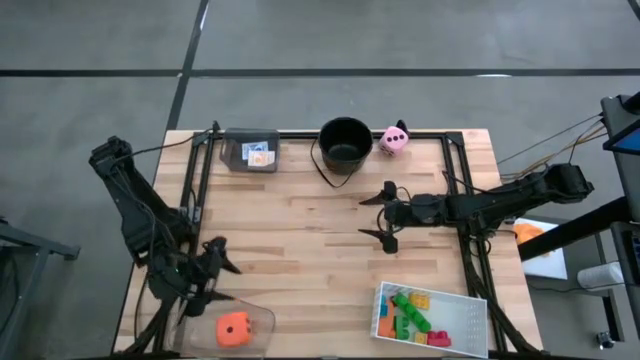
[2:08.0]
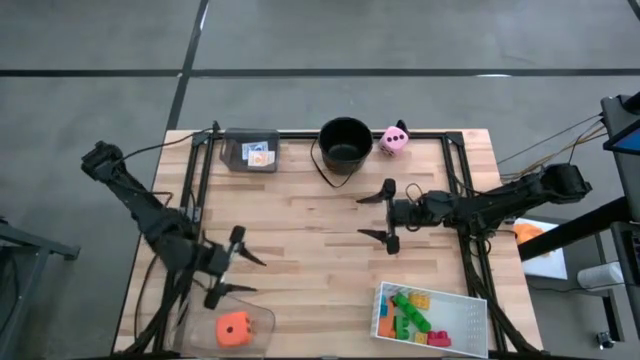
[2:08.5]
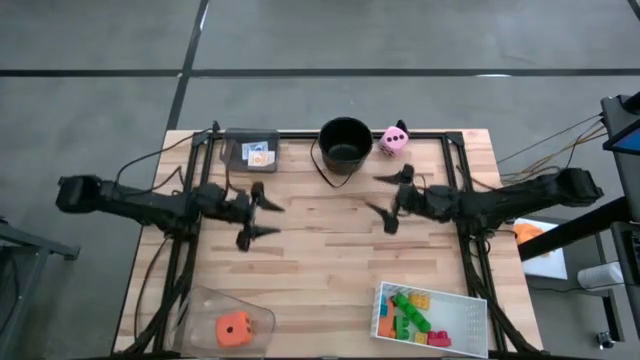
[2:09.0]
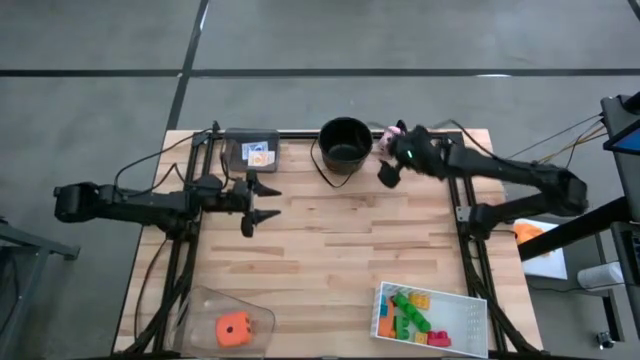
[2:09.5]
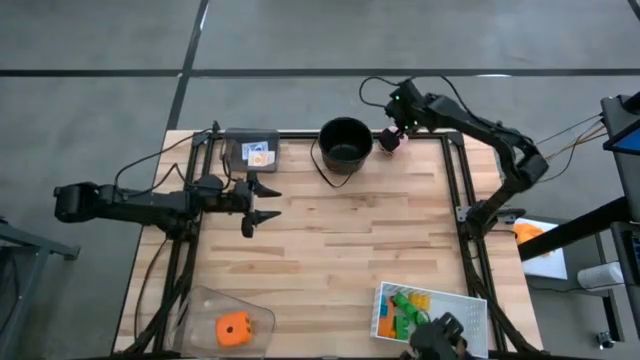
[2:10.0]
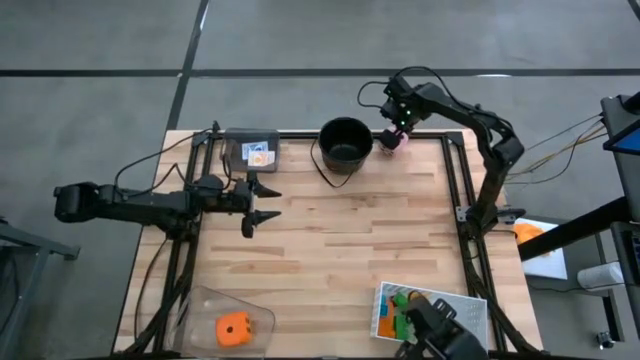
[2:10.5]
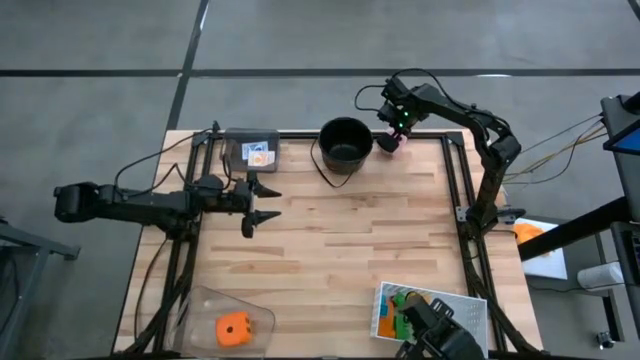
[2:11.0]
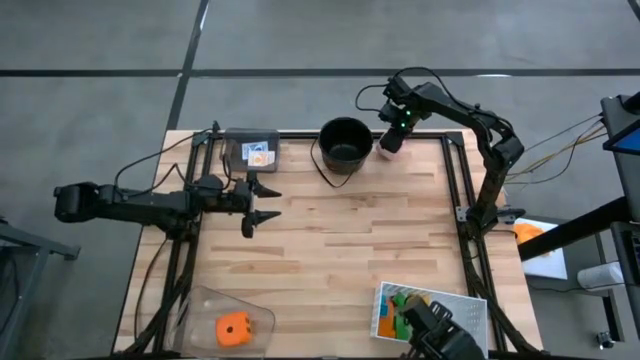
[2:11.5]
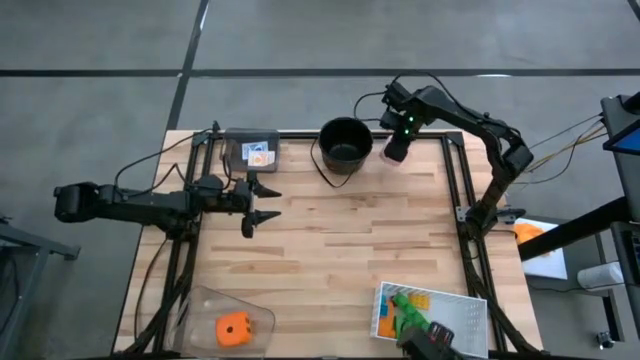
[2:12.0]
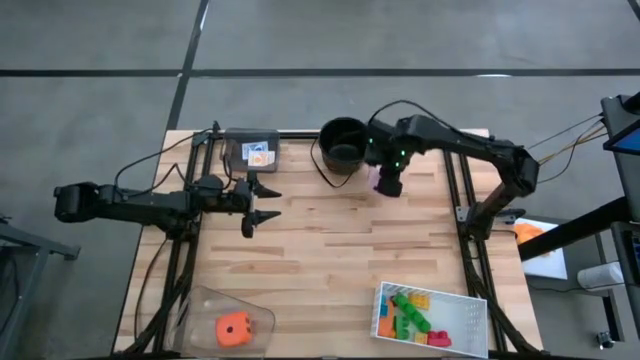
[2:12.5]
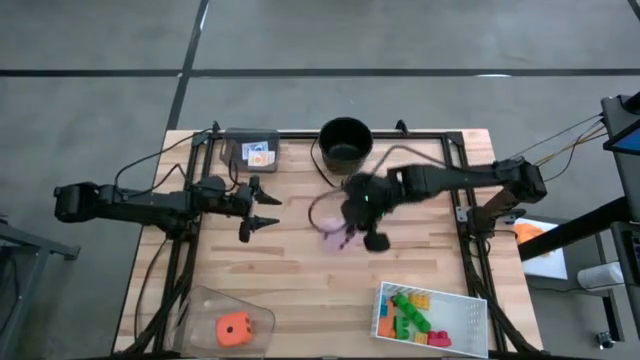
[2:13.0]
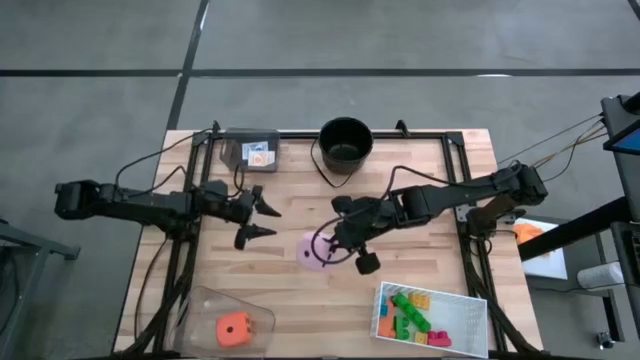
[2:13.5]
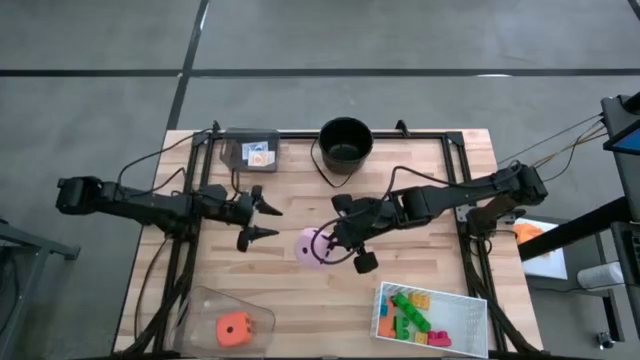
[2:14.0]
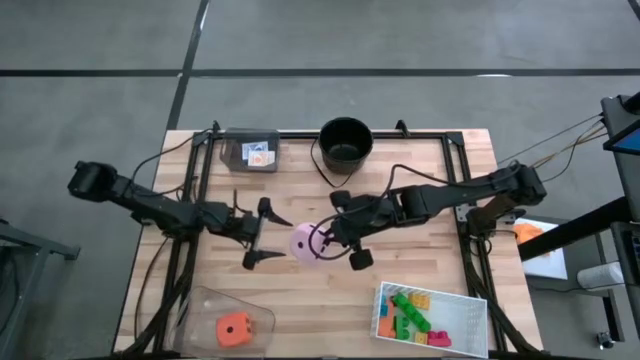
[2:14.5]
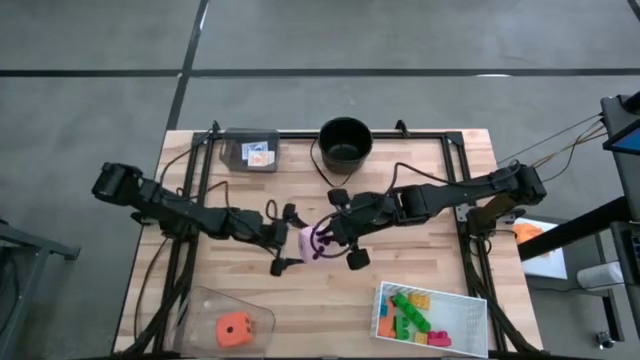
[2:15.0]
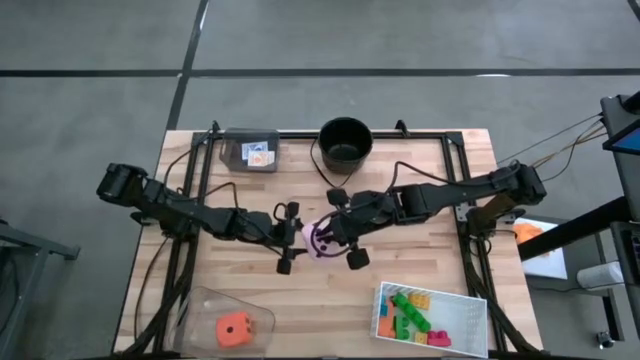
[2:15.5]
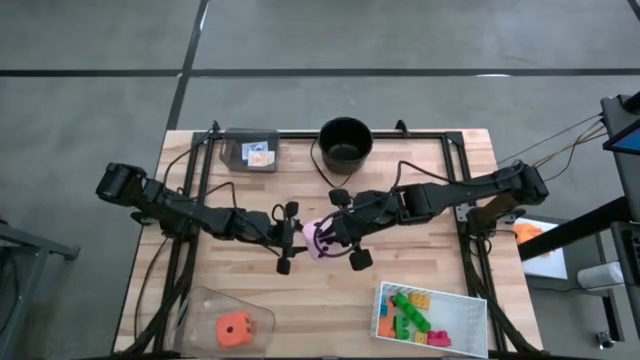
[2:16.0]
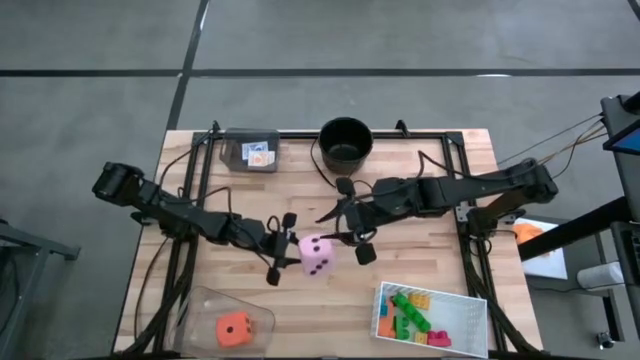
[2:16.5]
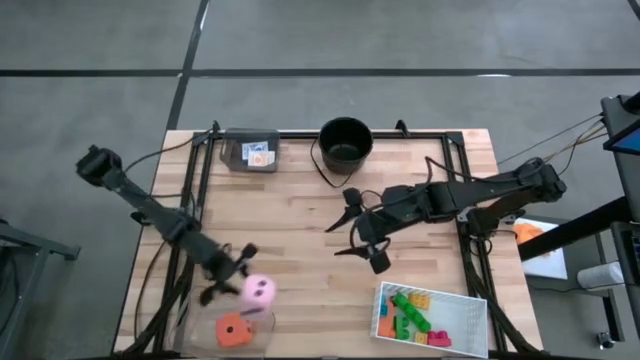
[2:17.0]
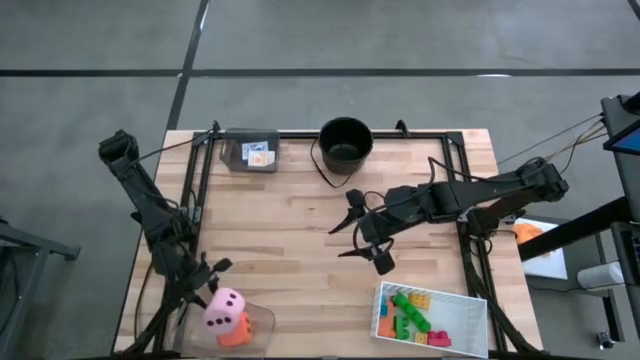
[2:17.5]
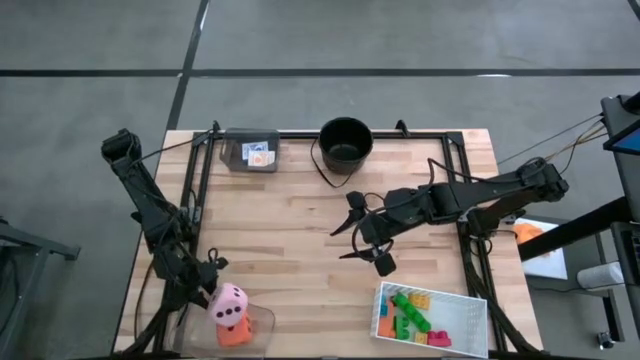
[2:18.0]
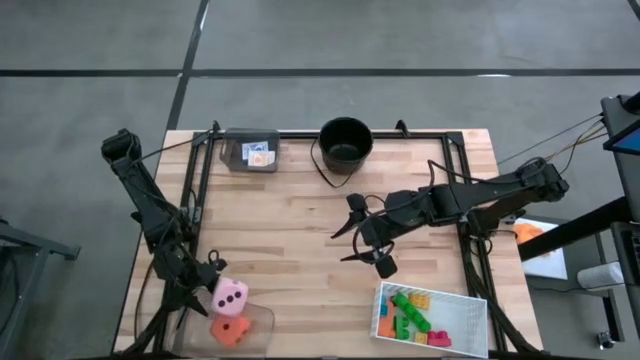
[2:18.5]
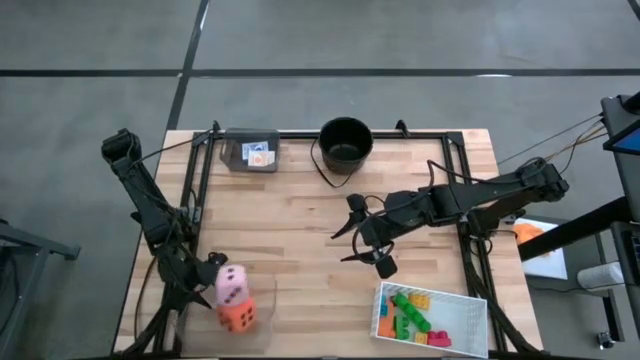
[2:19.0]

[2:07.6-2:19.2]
Task: Pick & Place Toys
Put the pink dice into the transparent bin

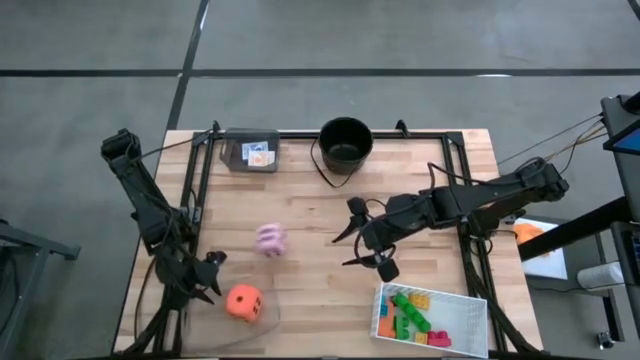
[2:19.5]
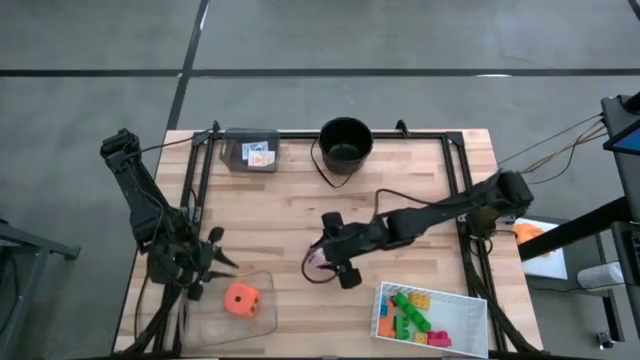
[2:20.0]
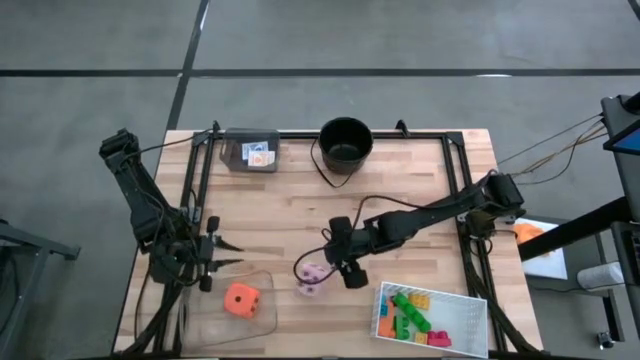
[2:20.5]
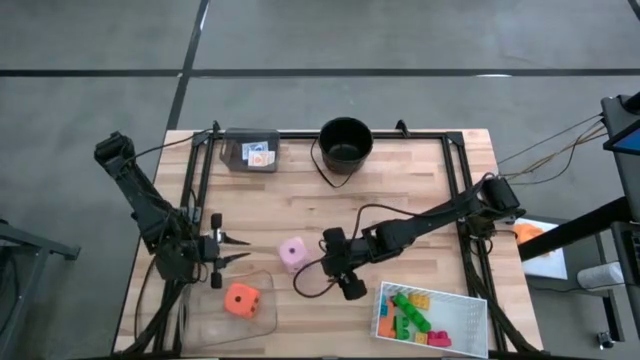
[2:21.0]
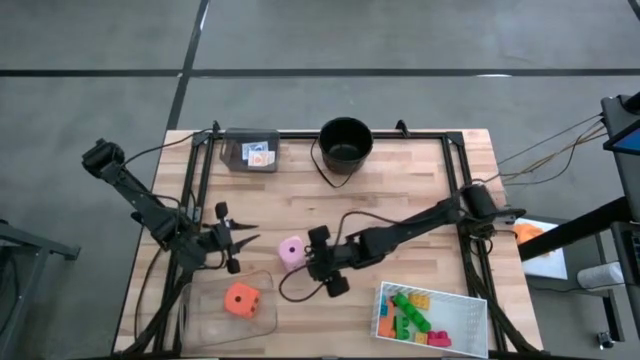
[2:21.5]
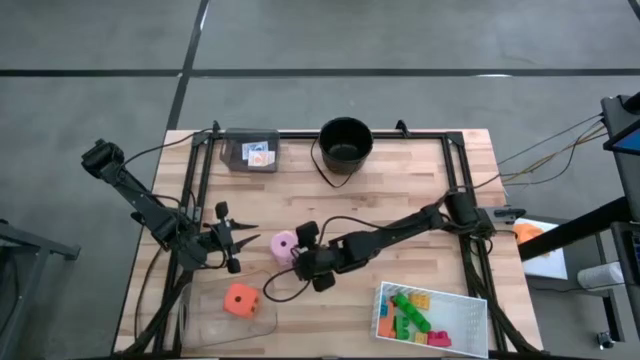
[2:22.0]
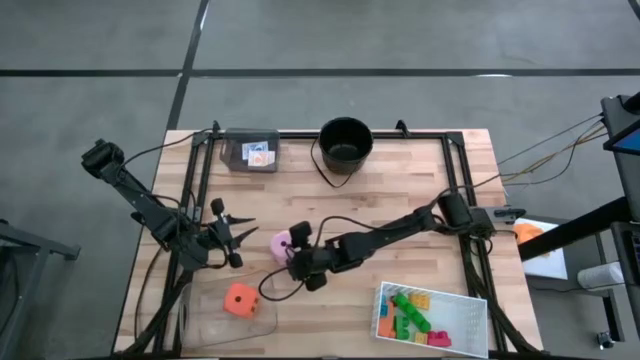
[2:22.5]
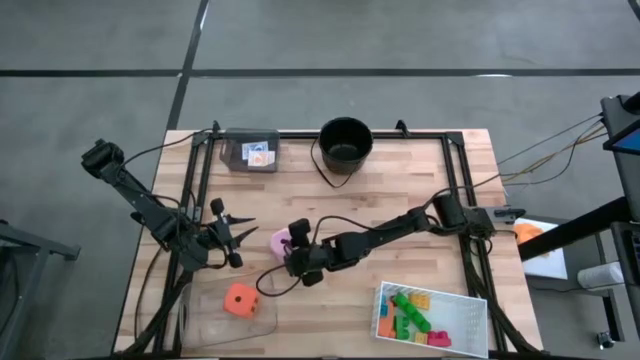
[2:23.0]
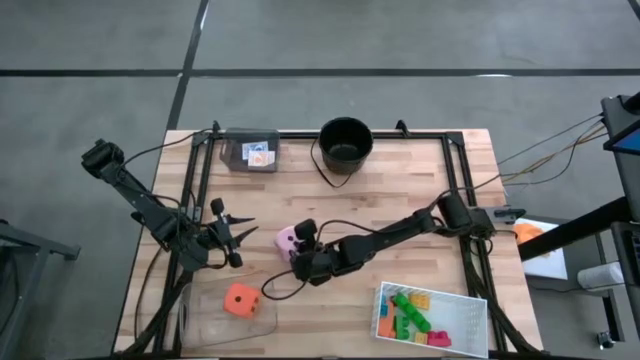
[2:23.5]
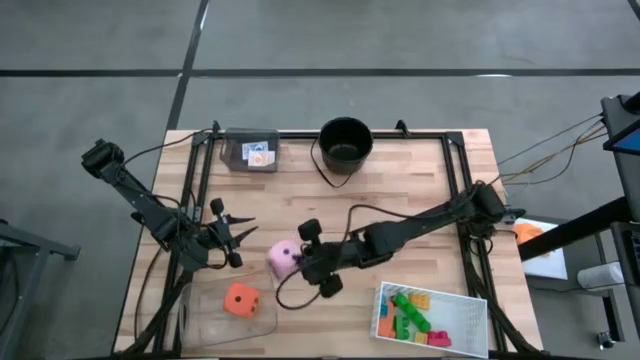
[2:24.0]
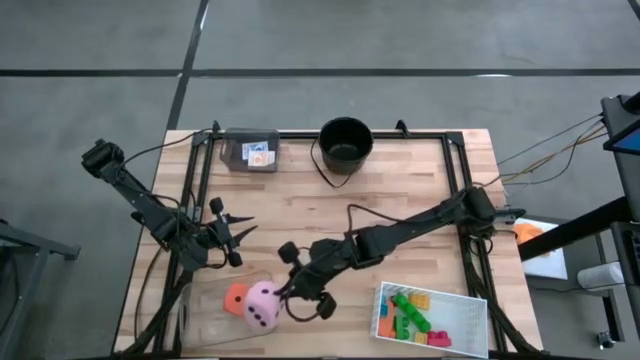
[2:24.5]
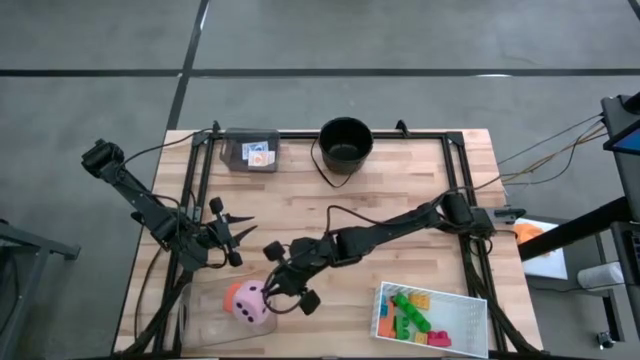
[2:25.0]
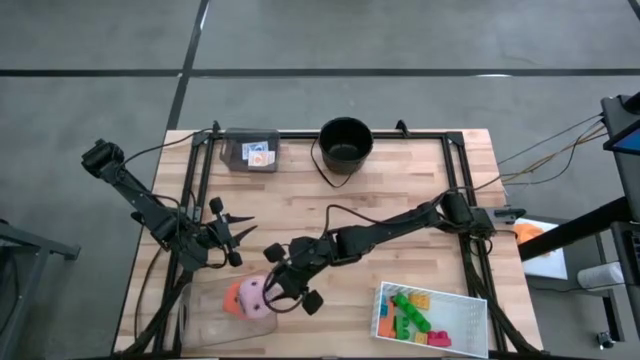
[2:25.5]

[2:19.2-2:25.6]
Put the pink dice into the transparent bin

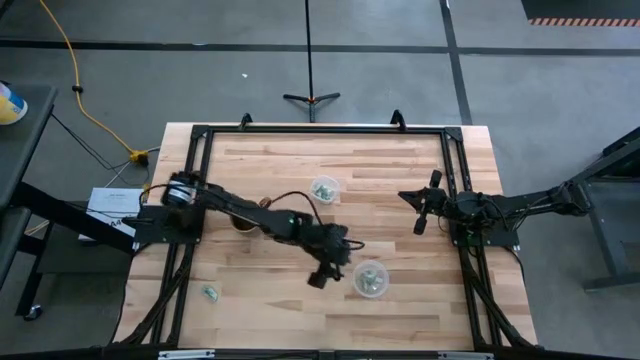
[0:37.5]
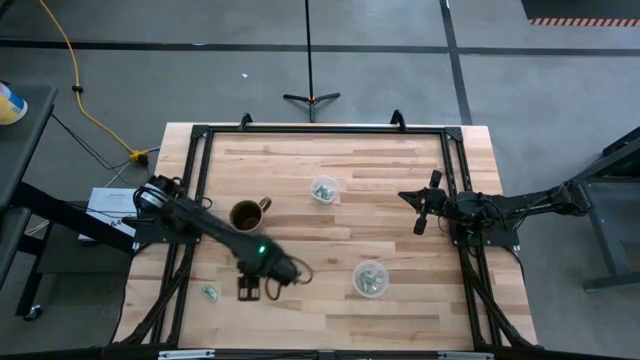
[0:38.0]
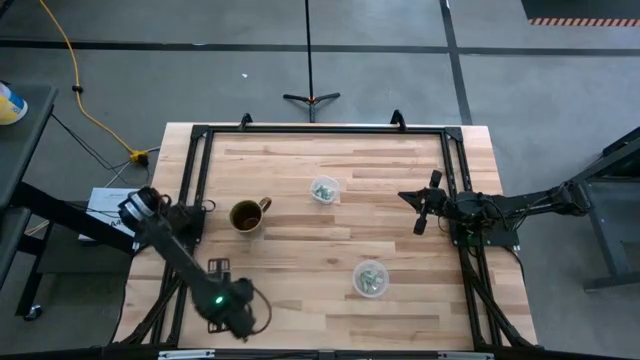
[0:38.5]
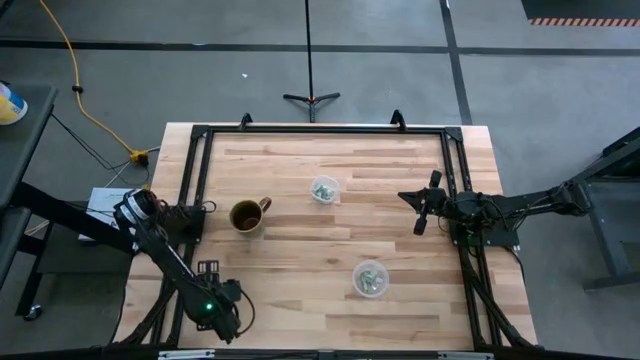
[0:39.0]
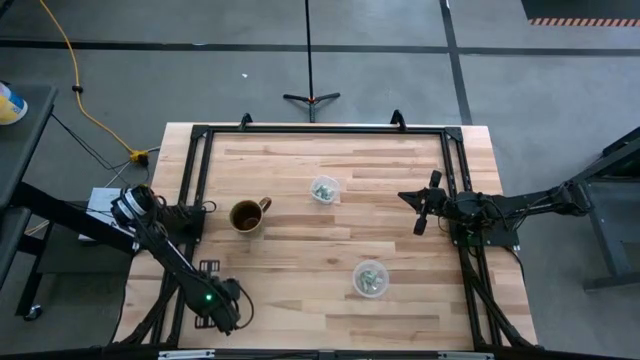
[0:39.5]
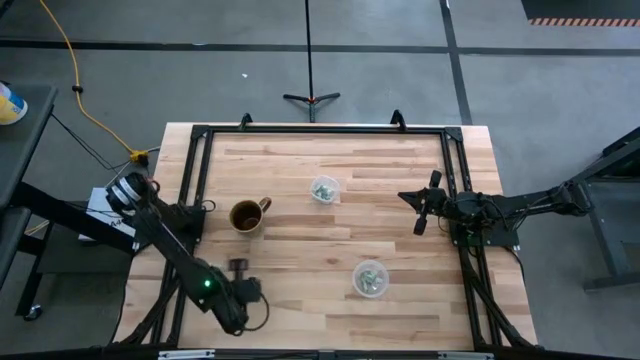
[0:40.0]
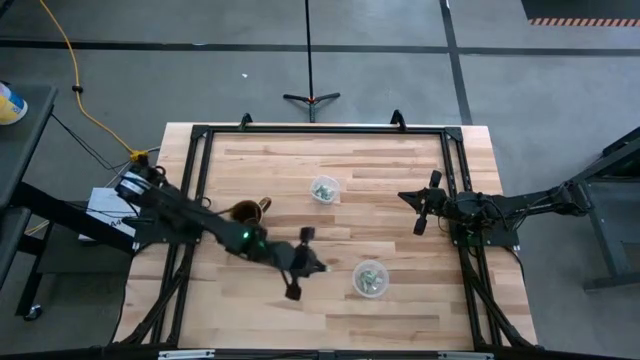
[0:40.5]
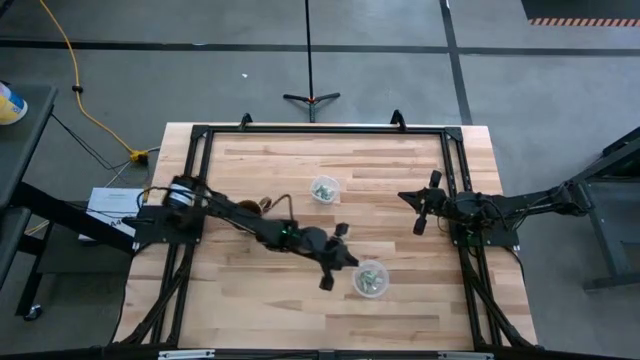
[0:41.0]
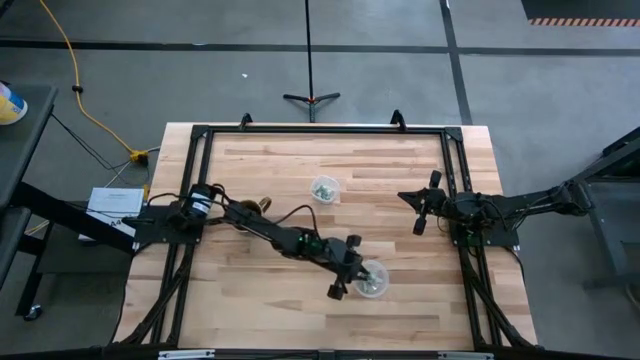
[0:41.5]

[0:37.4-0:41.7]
Task: Pick and place Stevia / Truvia into bins
Put the stevia packet into the bottom transparent container
